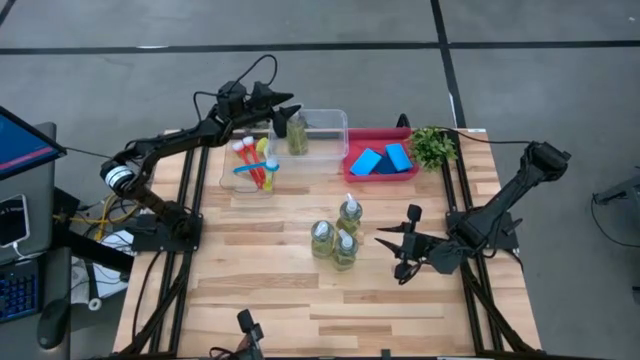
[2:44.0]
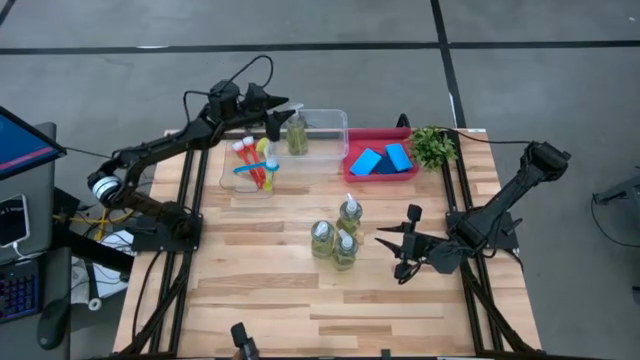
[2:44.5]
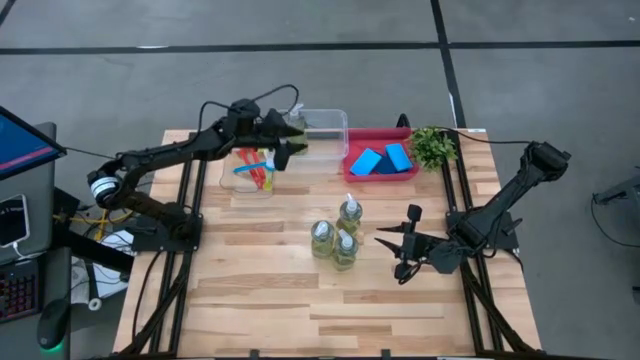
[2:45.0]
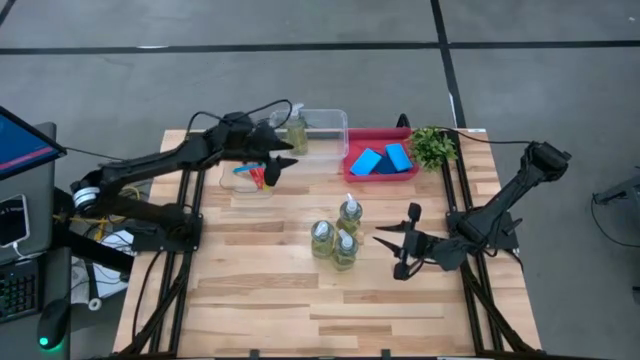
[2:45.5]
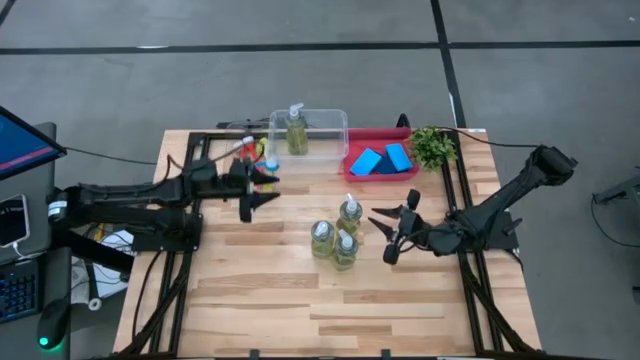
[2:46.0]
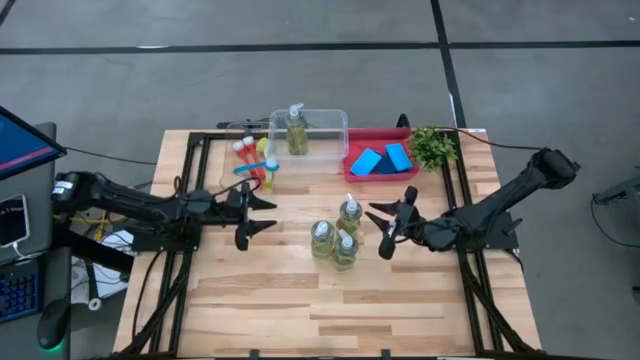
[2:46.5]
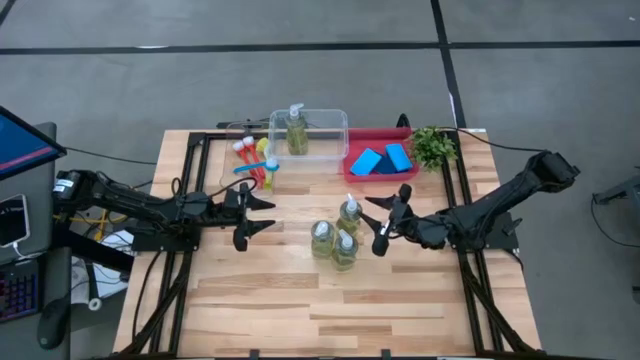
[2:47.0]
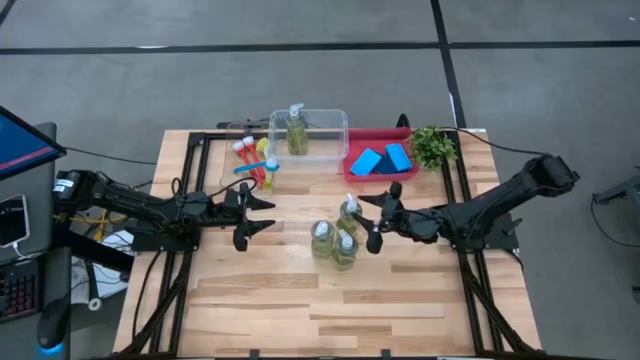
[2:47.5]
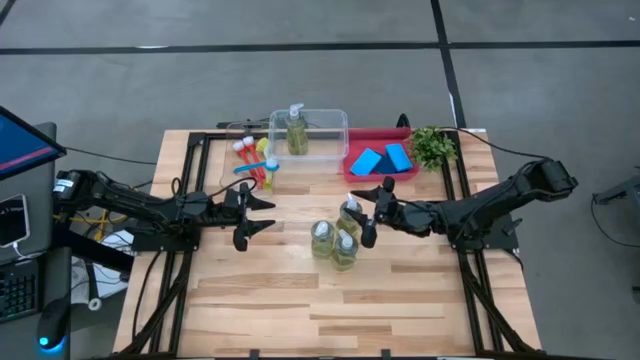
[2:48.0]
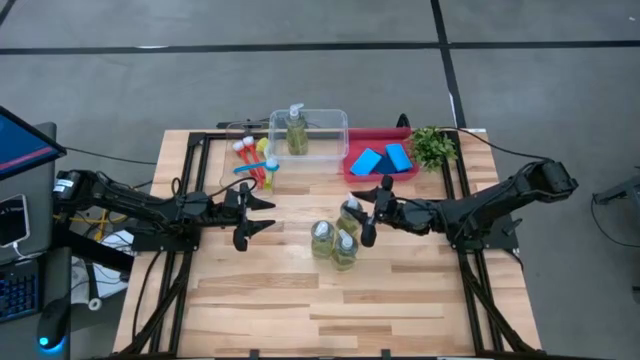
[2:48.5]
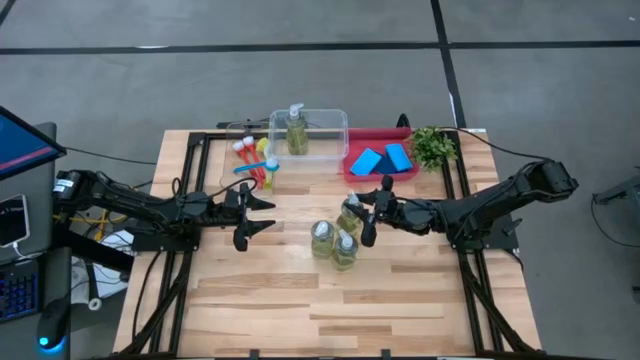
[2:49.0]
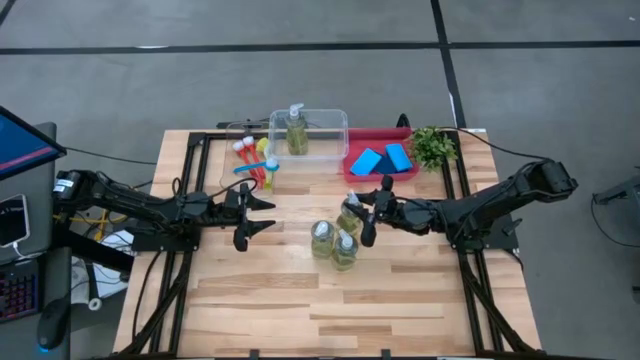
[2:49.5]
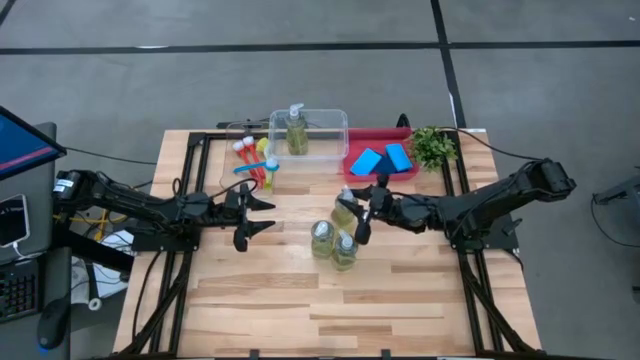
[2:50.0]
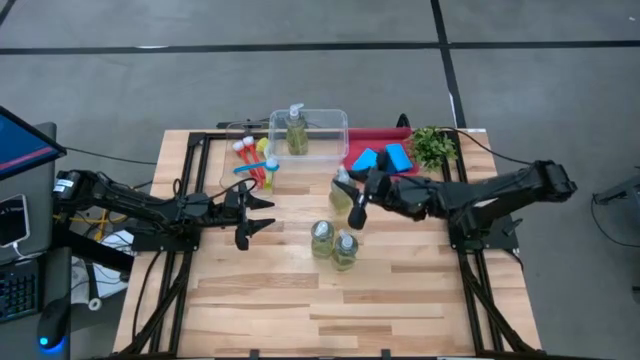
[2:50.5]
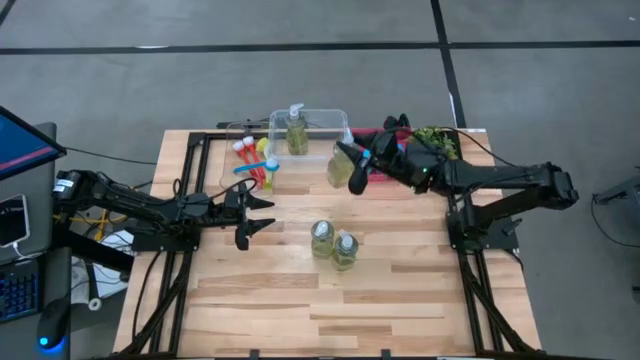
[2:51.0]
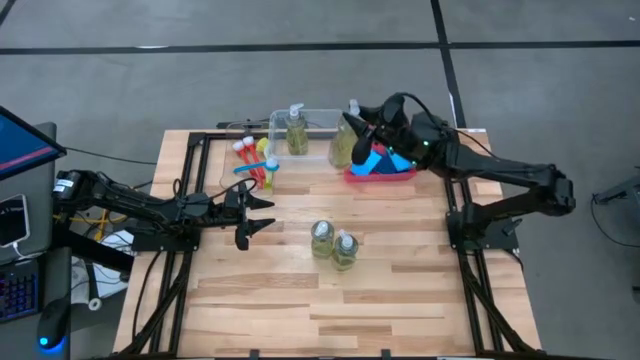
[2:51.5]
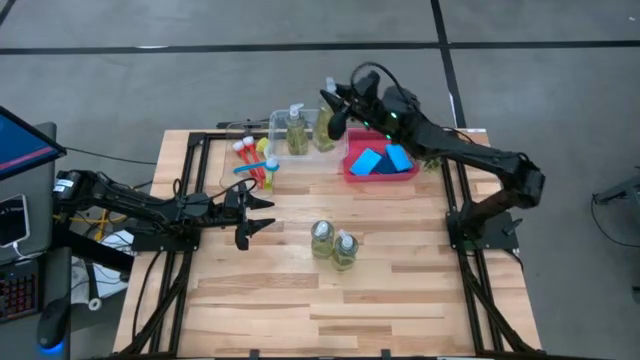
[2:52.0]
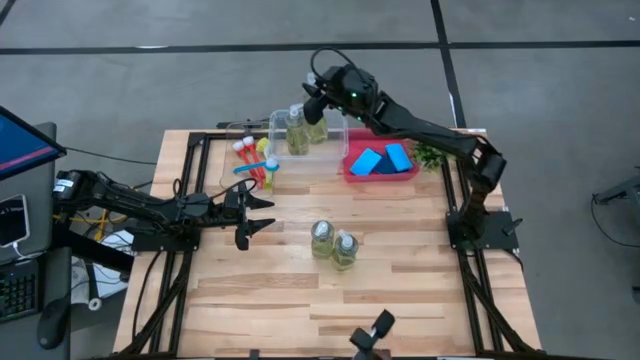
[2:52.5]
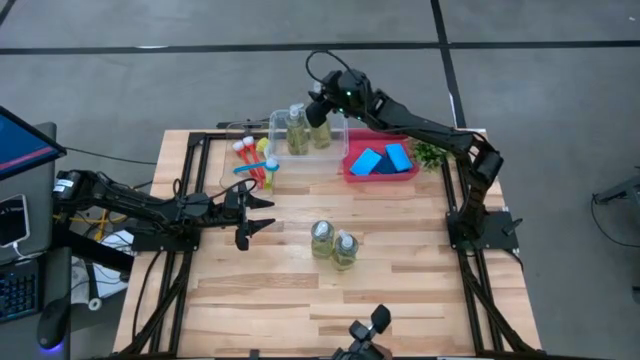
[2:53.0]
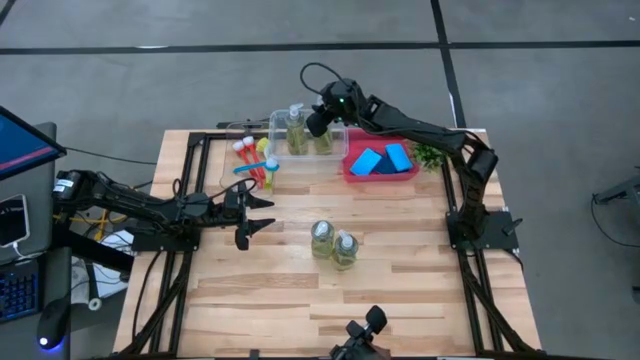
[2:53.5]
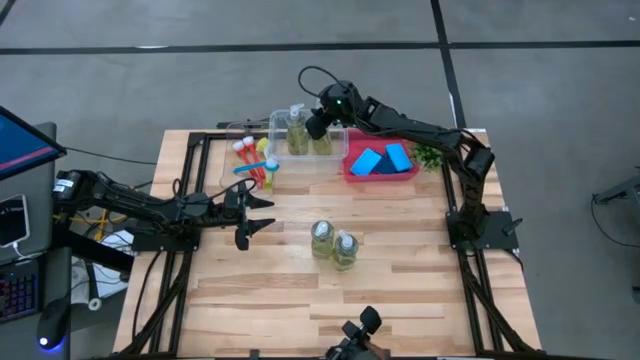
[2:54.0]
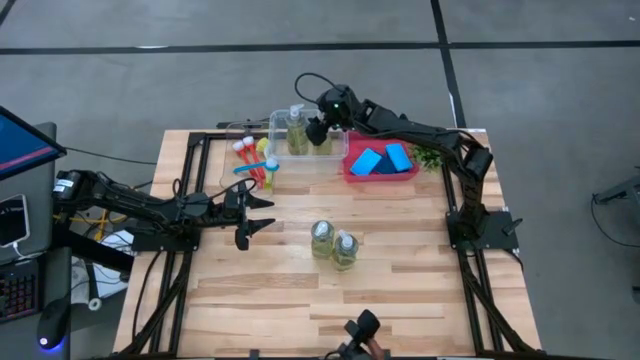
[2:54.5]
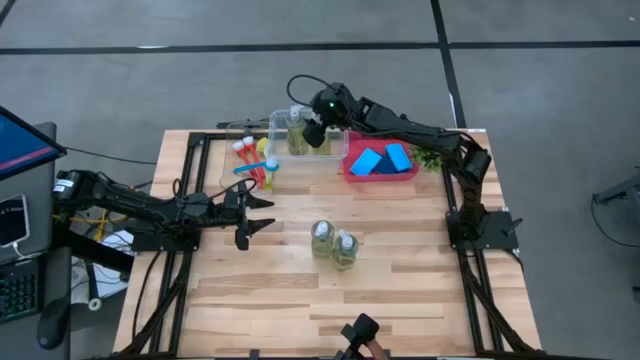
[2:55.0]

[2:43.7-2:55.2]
Task: Pick & Place Kitchen Sink Supplies
Put the yellow dishwashing liquid dispenser bottle into the right transparent bin

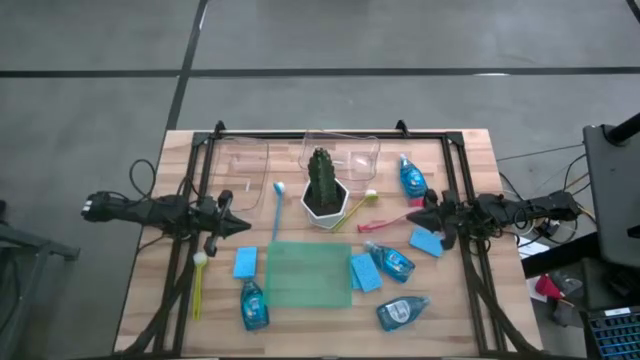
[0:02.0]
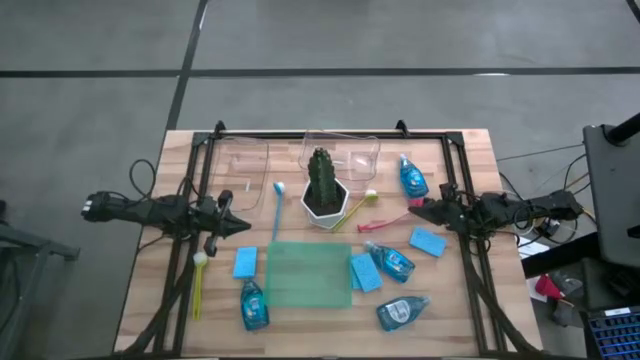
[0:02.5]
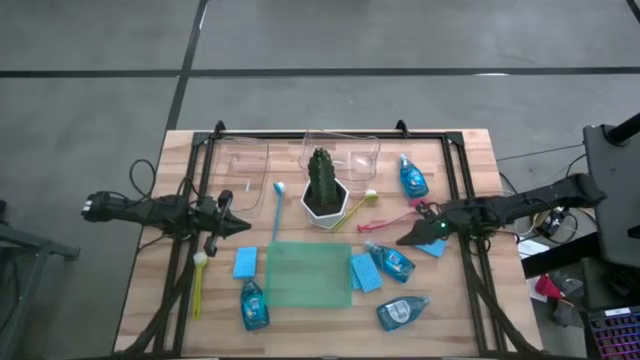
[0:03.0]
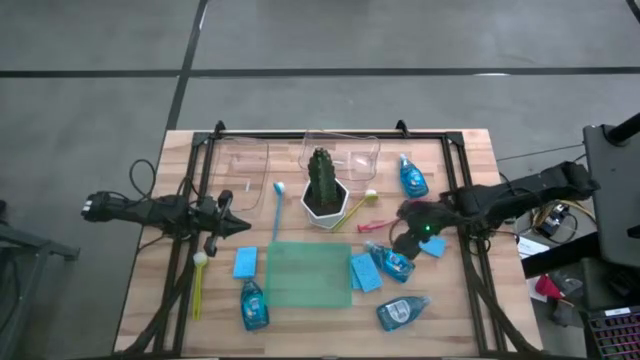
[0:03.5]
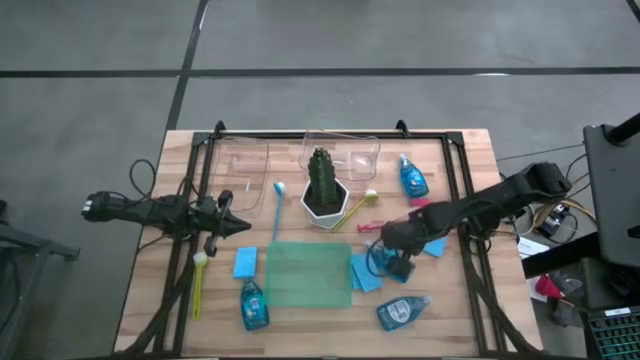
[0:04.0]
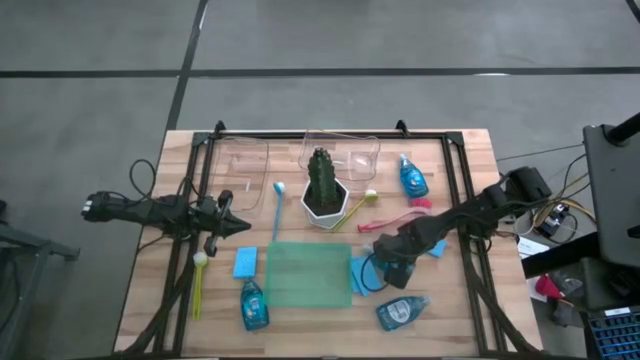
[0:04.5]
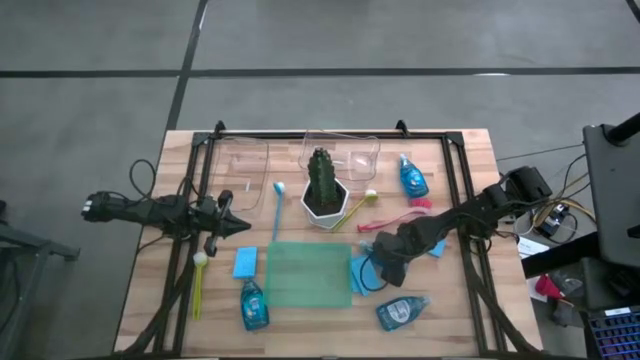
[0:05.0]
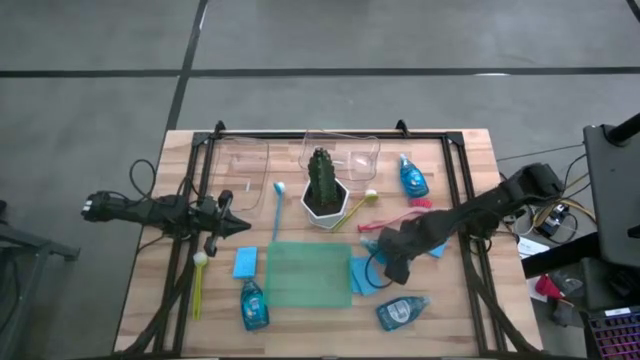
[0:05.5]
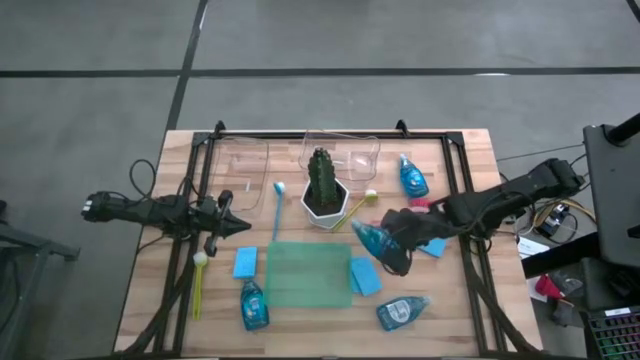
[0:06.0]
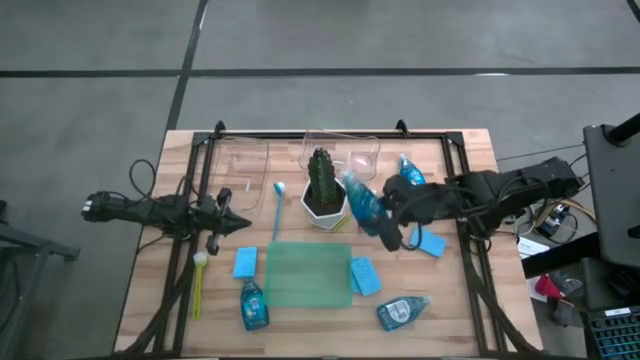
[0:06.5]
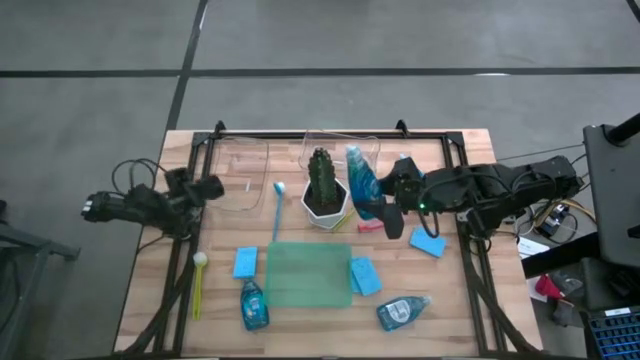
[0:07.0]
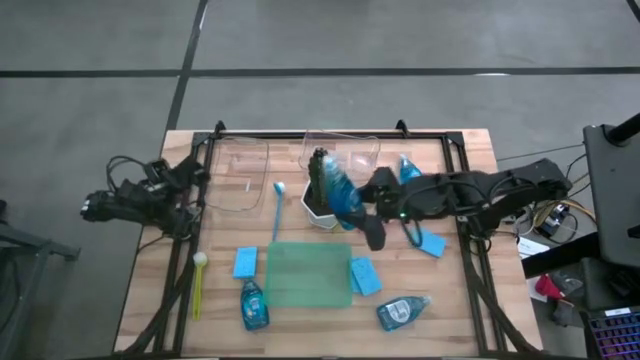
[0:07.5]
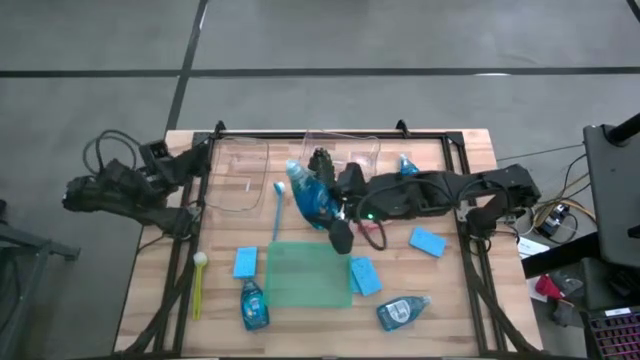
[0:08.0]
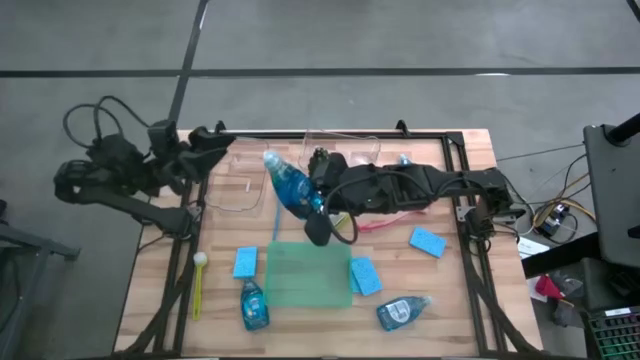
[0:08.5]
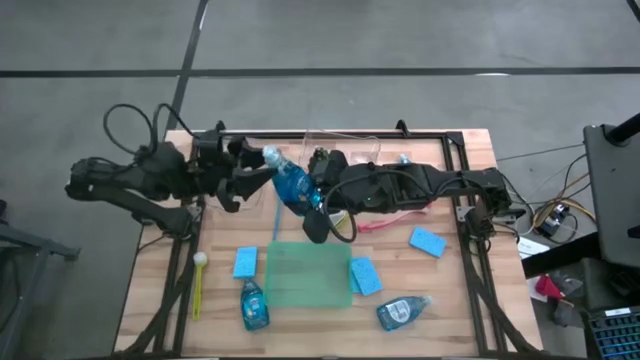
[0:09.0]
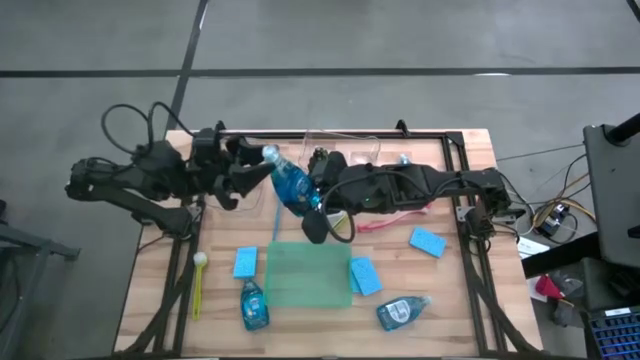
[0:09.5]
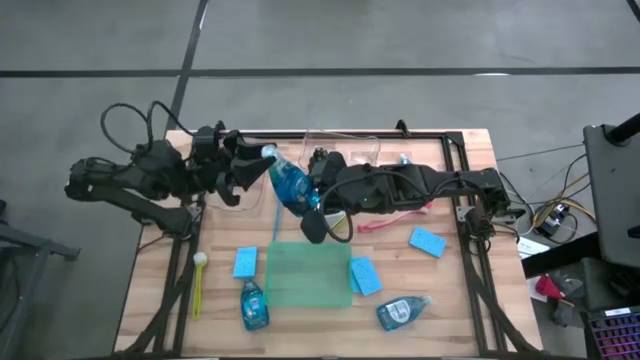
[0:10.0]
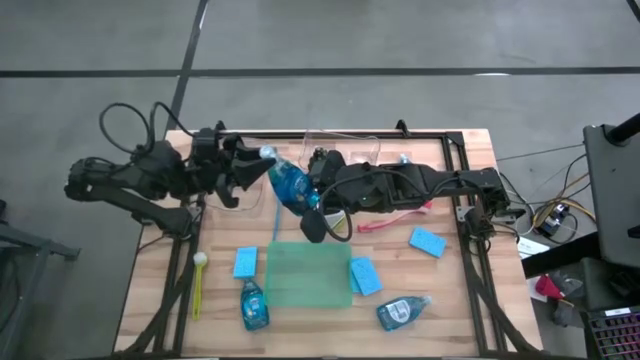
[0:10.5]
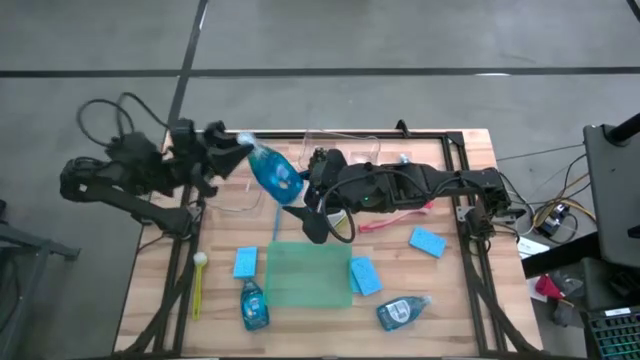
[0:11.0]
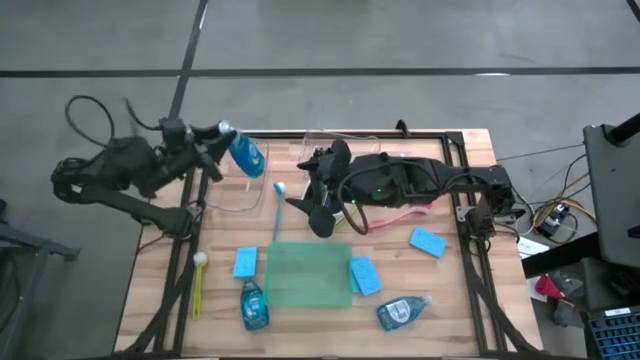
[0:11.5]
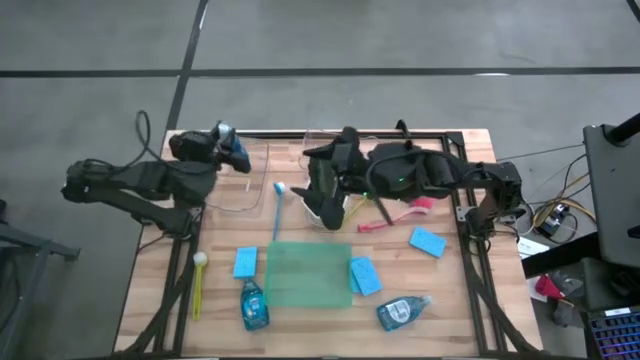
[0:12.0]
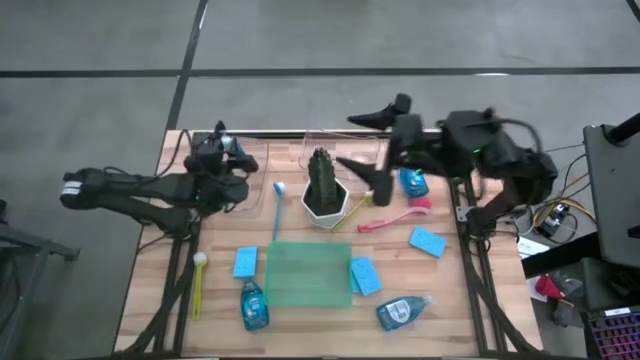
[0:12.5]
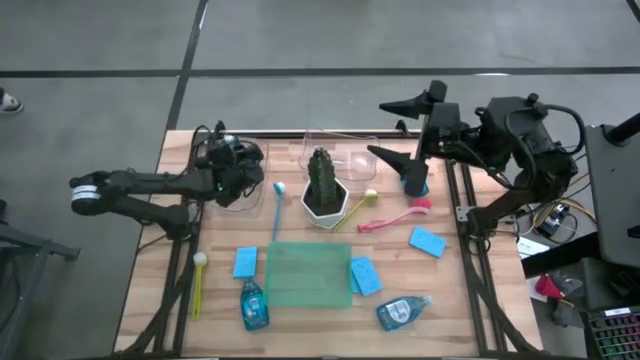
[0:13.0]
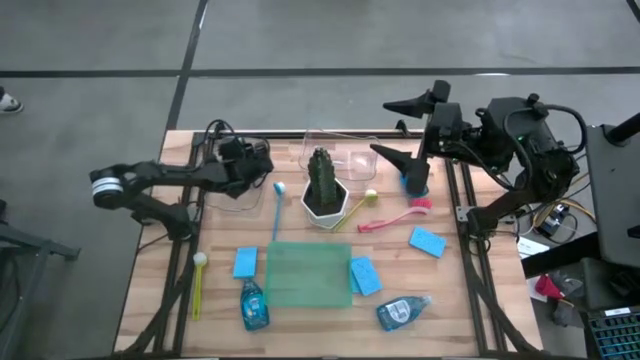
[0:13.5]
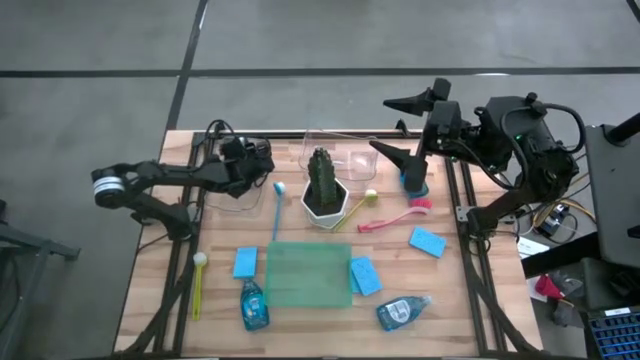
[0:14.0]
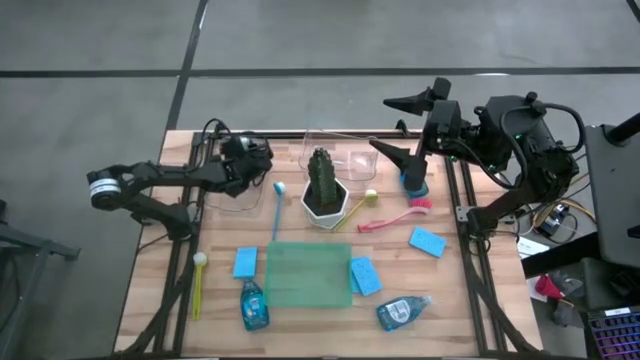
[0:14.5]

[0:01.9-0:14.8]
Task: Pick & Place Kitchen Sink Supplies
Put the blue dishwashing liquid into the left transparent bin
